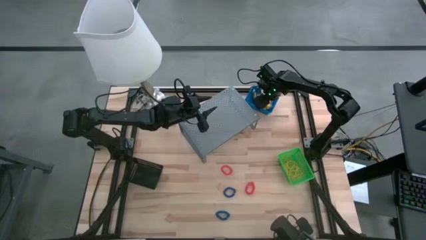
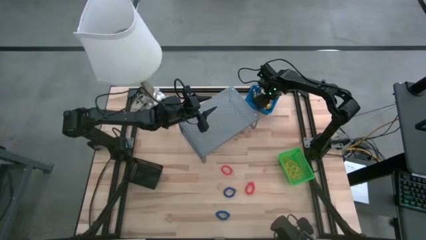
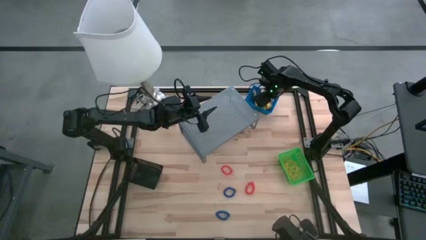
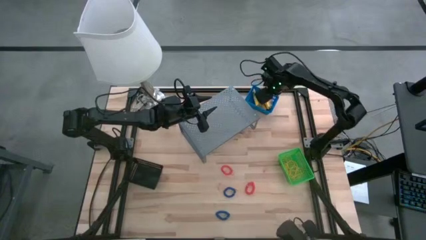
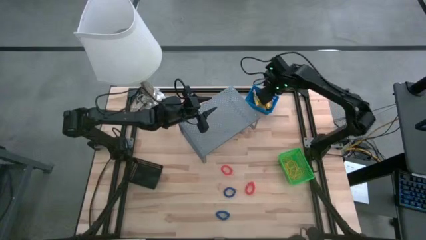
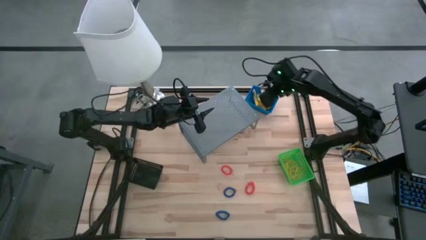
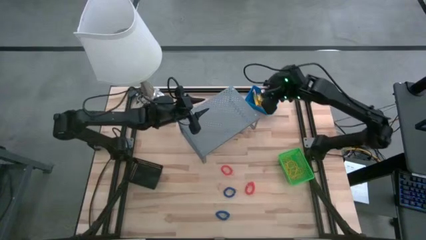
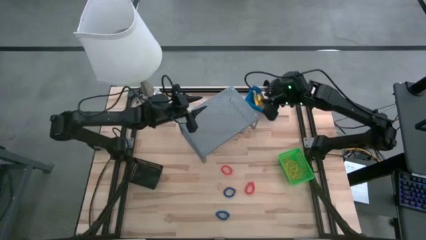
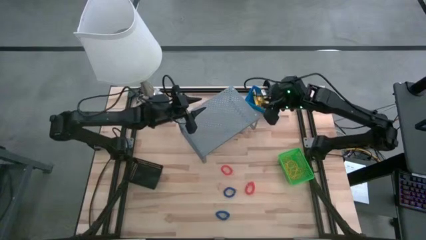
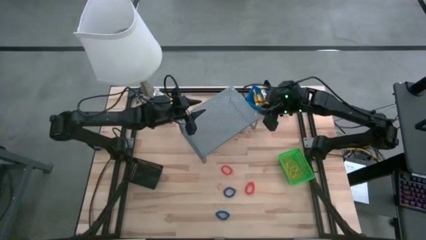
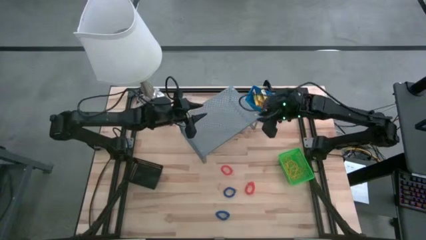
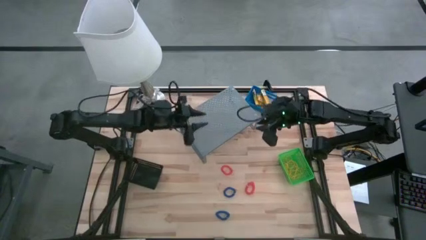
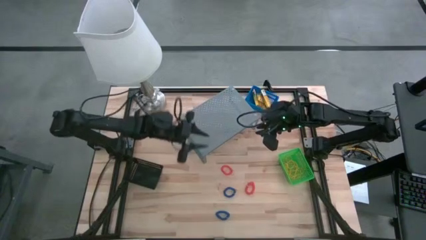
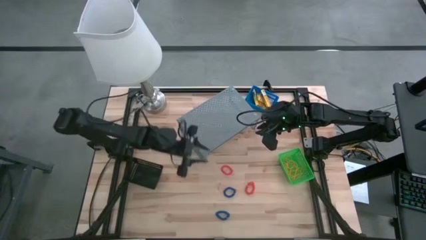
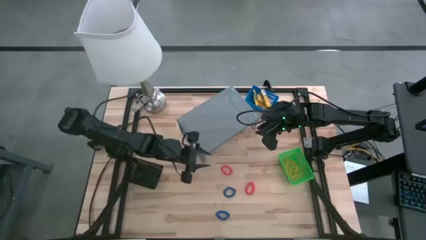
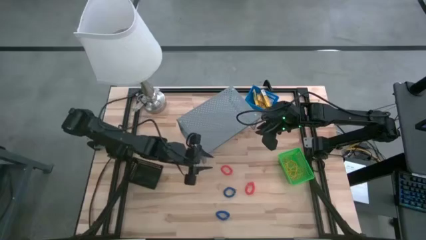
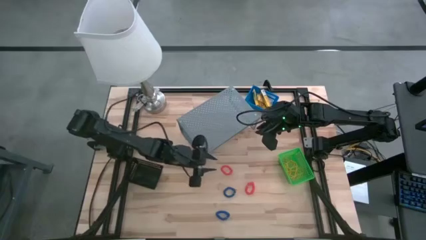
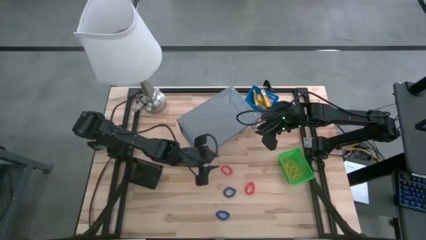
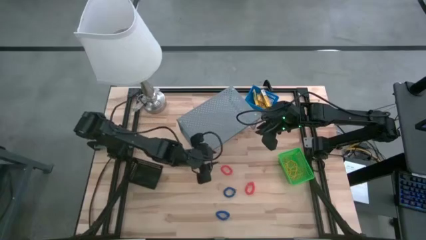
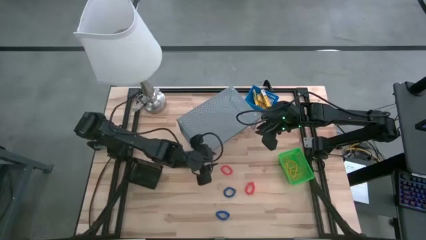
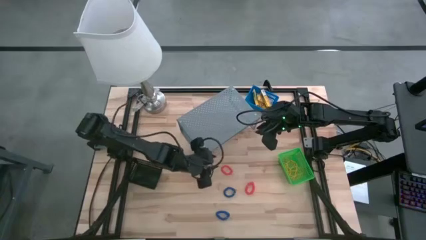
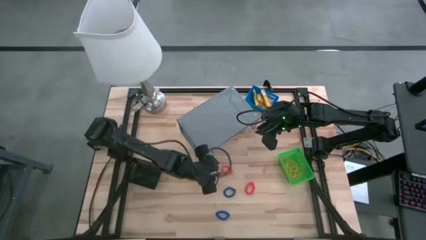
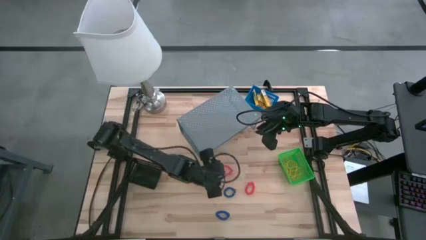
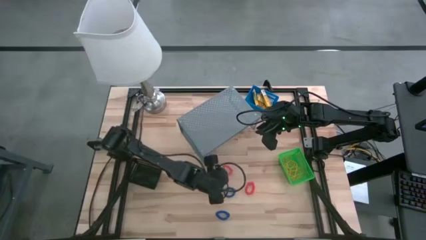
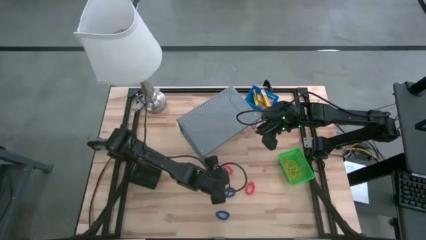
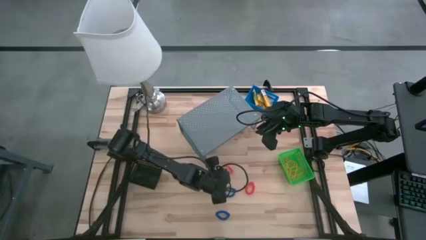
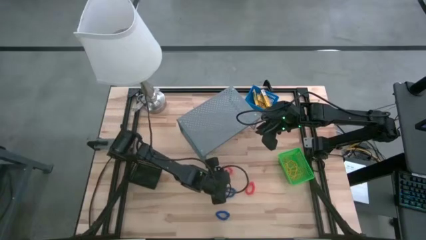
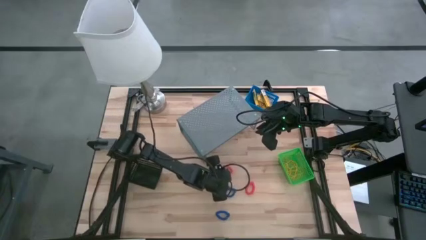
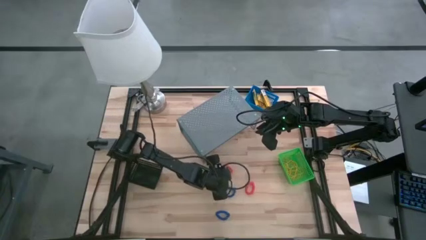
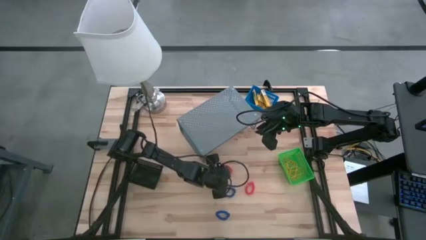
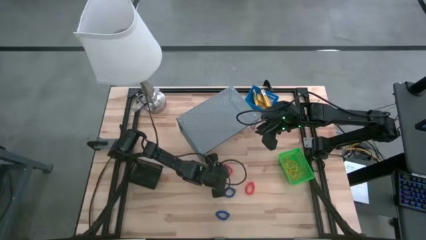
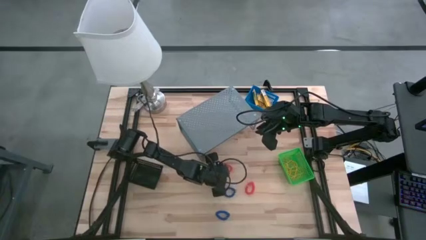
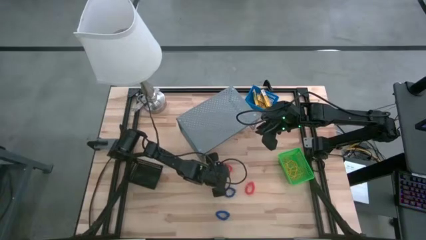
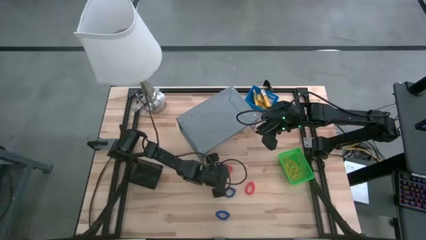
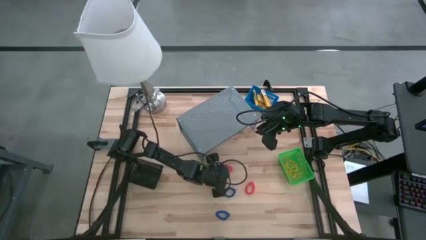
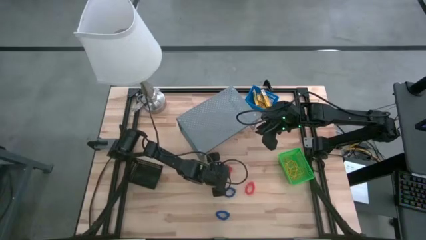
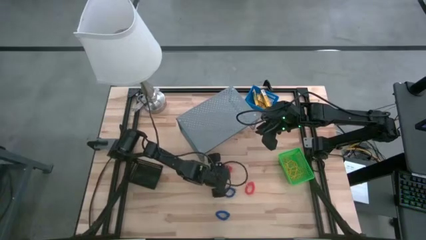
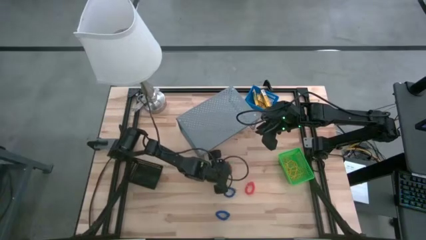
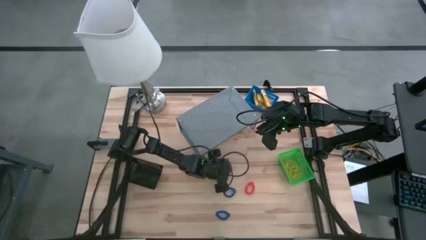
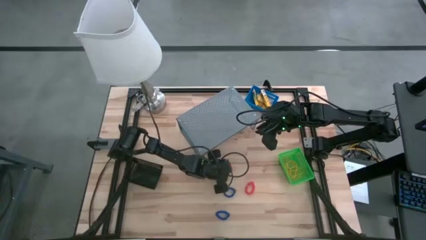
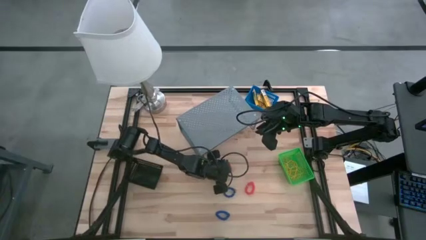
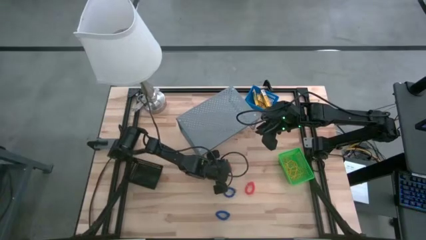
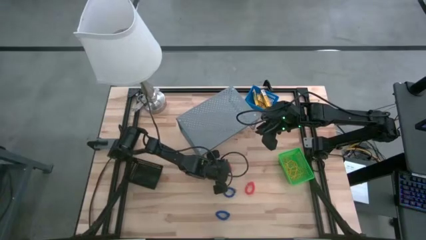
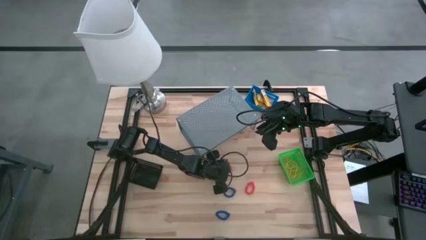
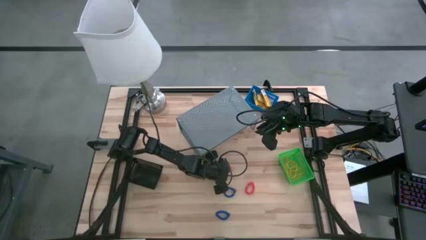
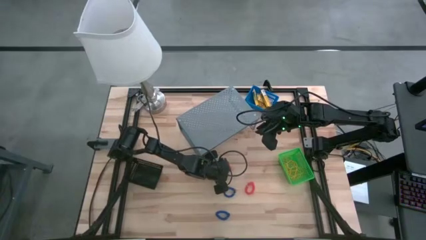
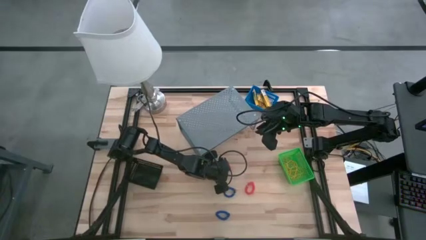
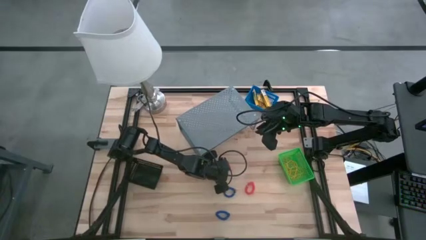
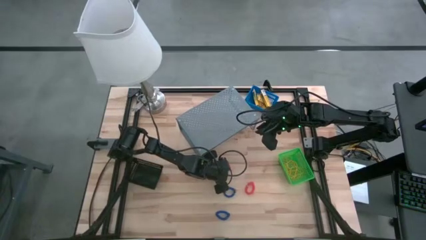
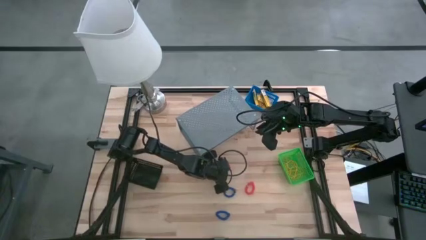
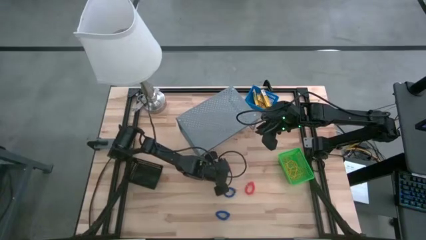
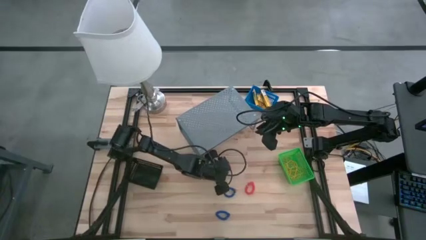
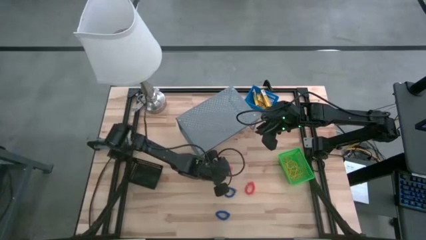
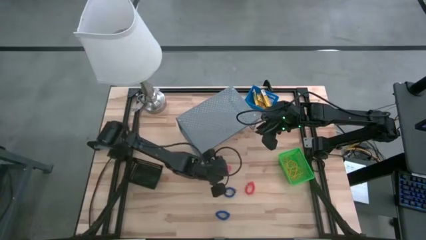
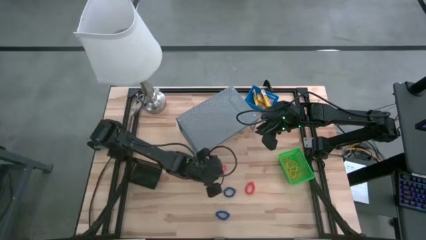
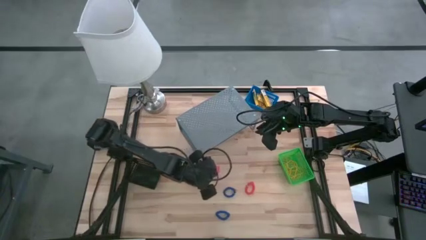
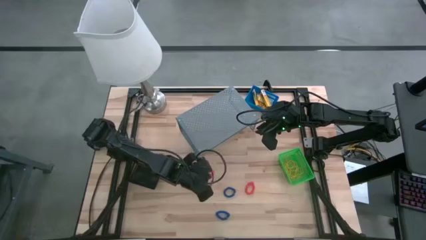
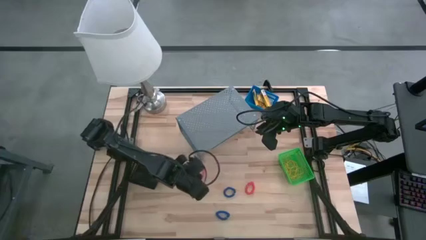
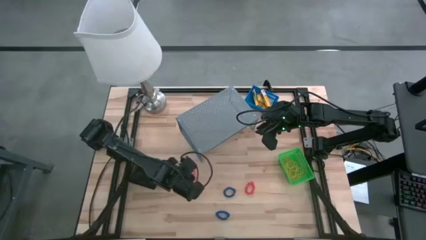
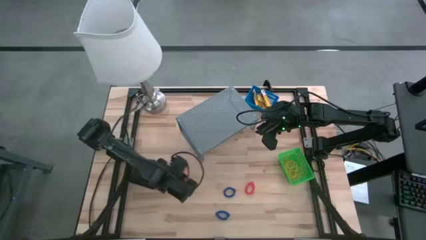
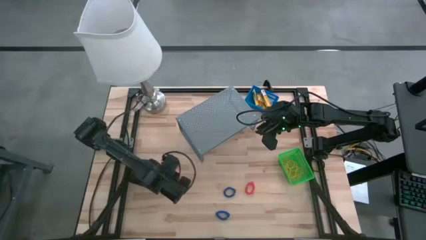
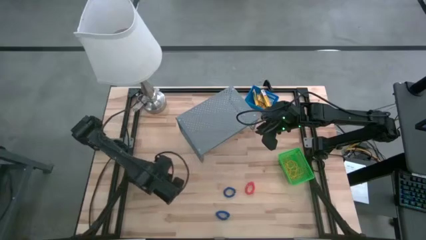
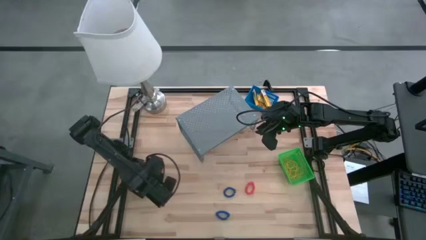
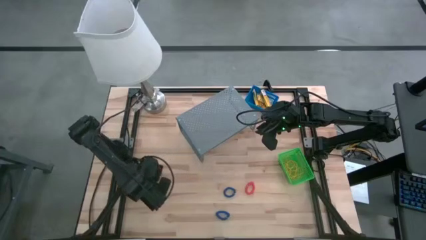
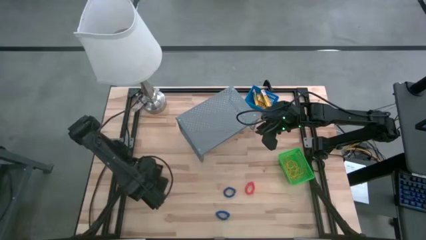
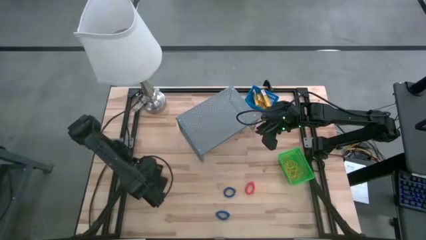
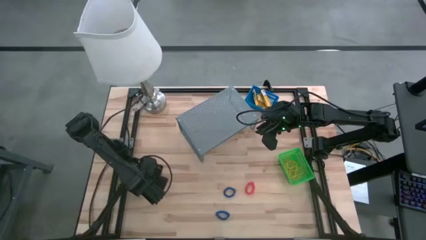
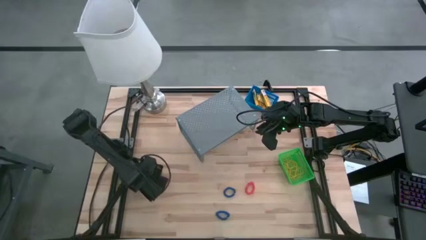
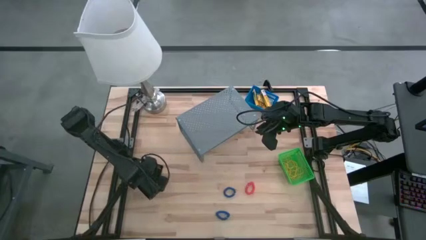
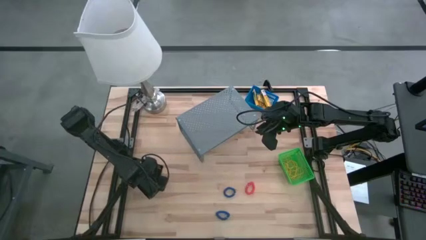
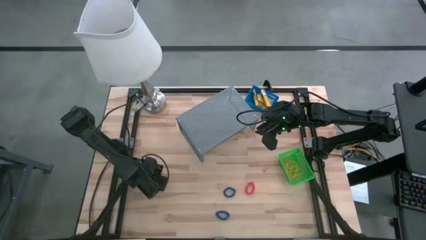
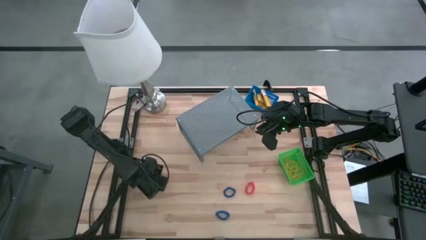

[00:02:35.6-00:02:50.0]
Task: Pick & Place Office Desk Supplies
Put the orange spring keychain into the black basket
